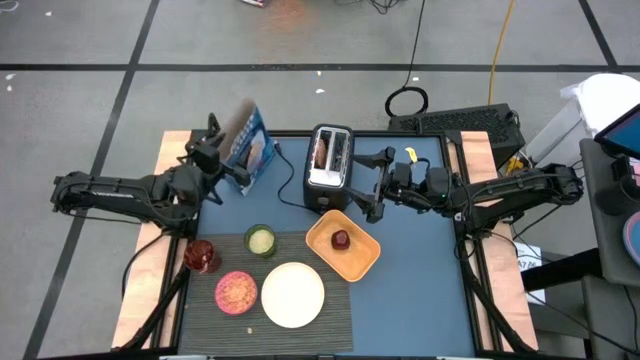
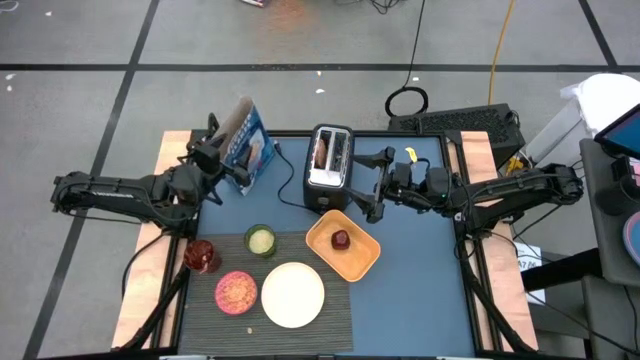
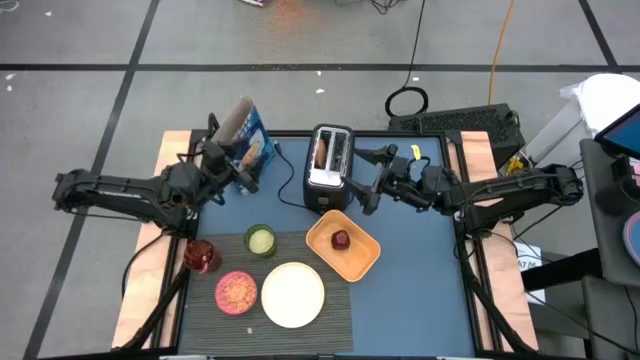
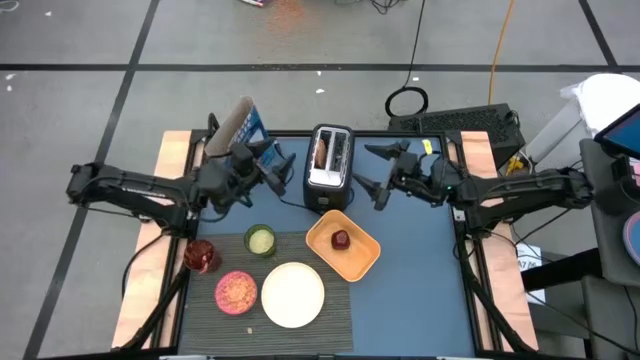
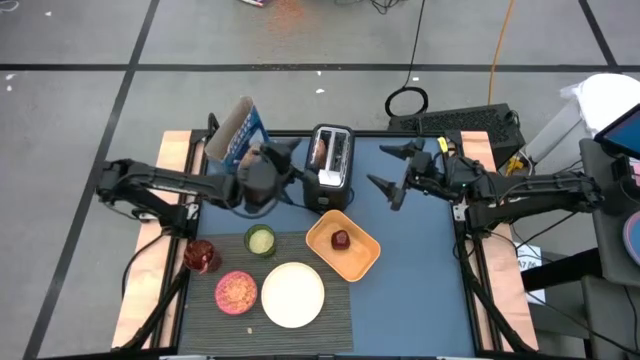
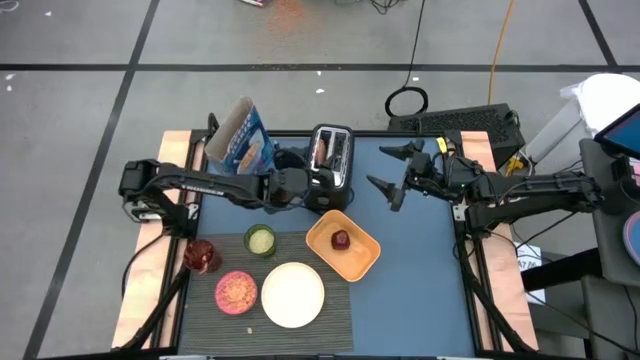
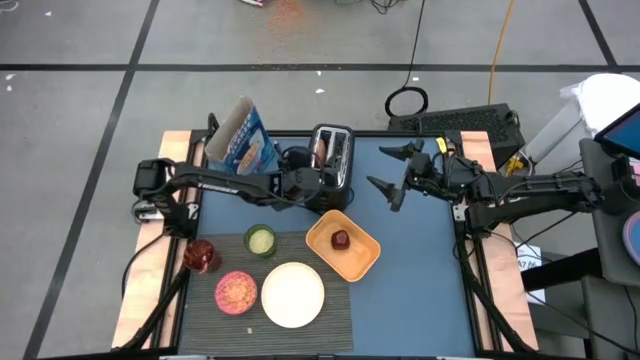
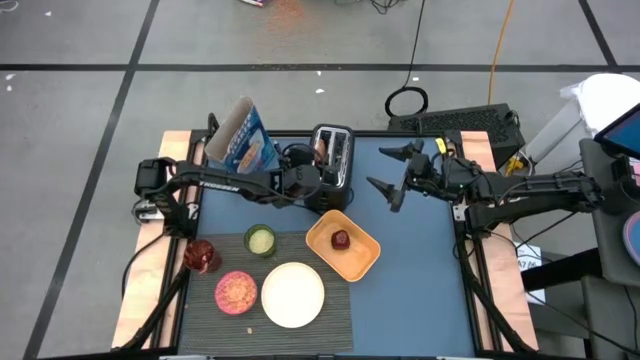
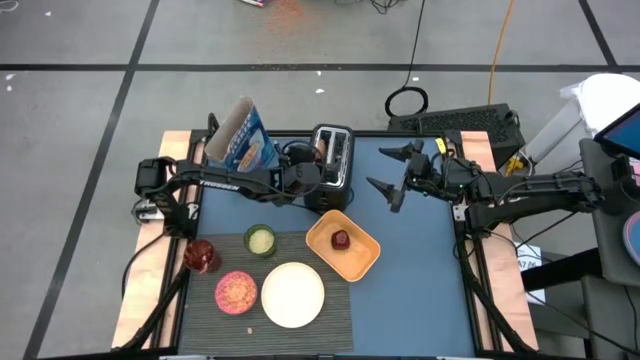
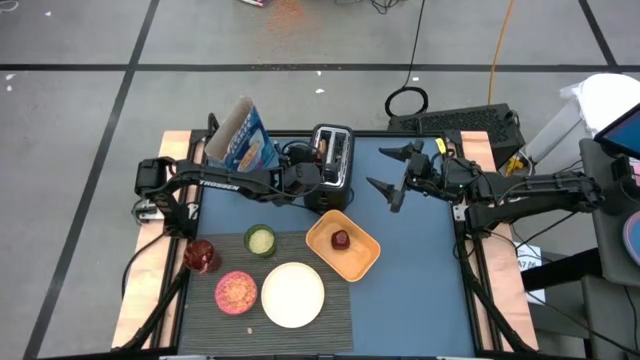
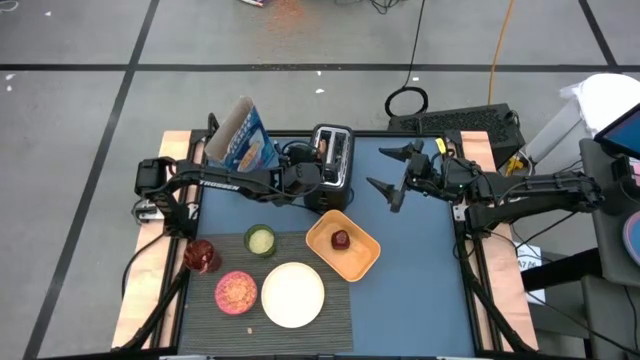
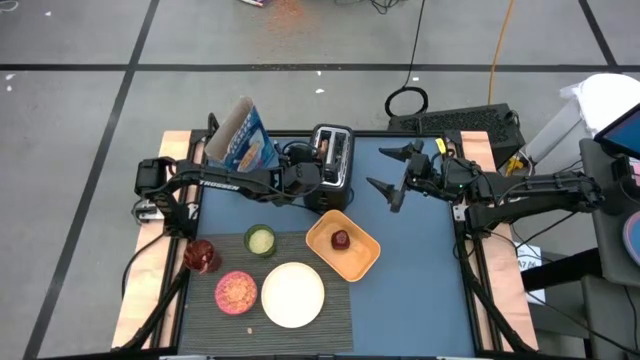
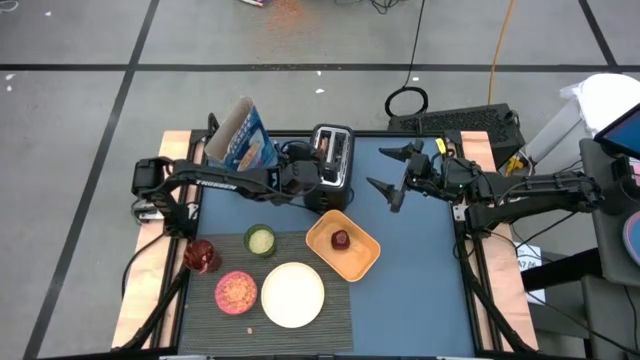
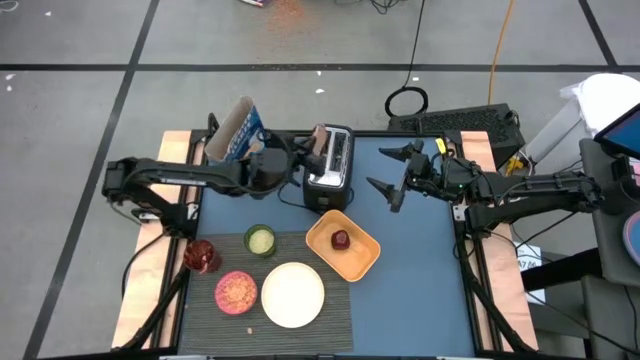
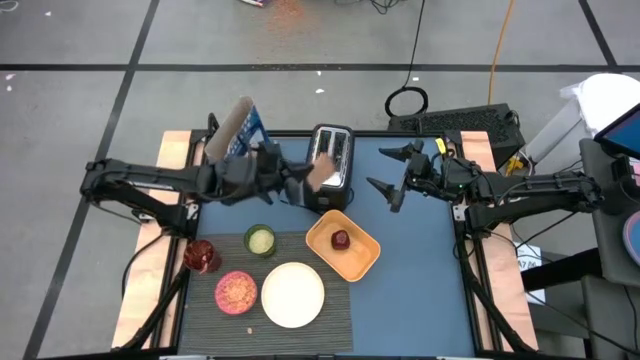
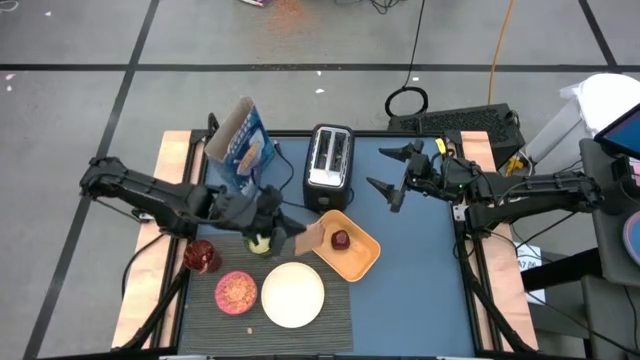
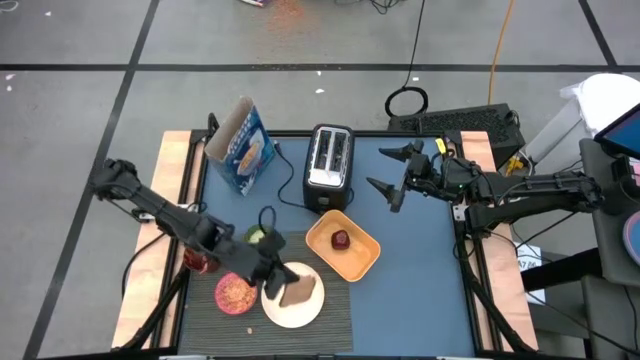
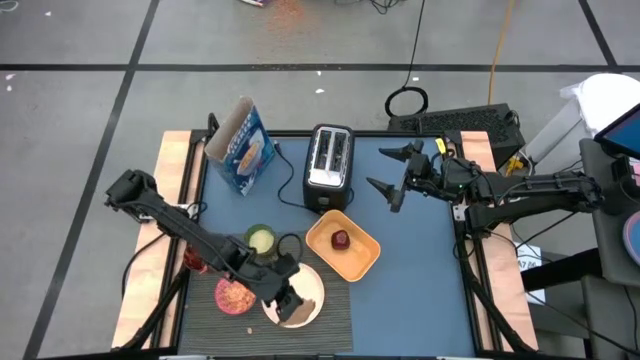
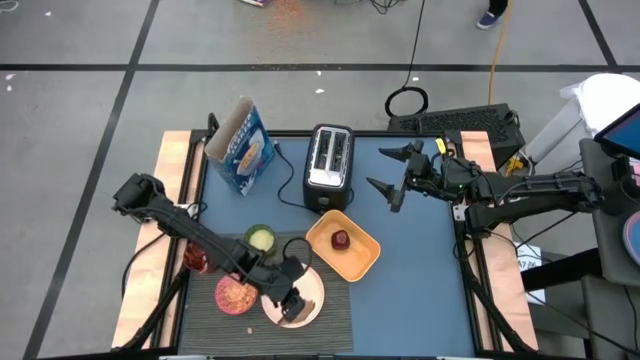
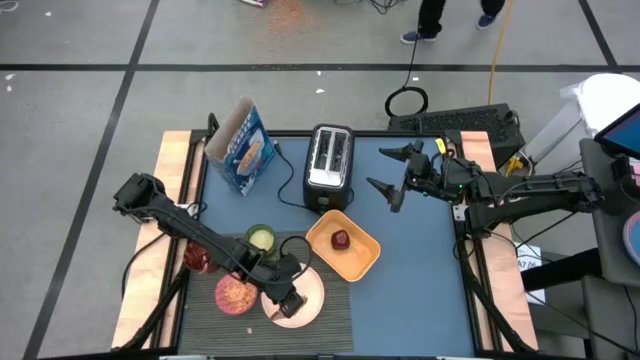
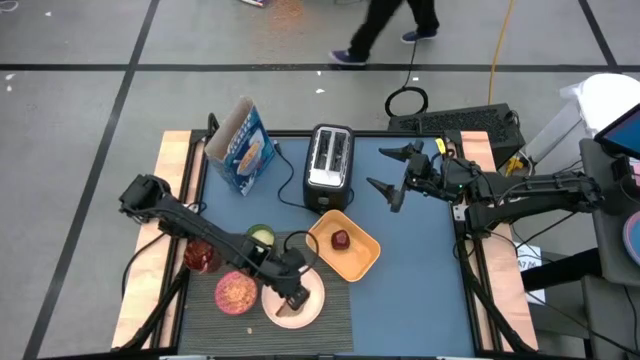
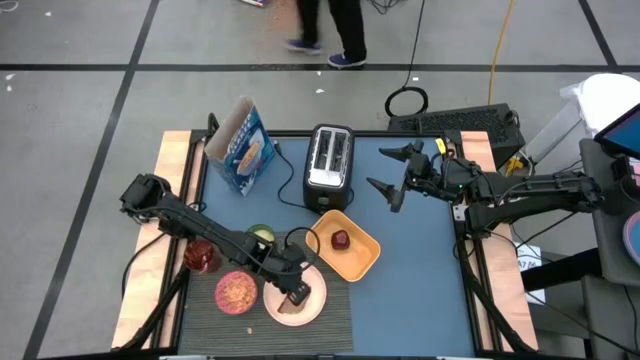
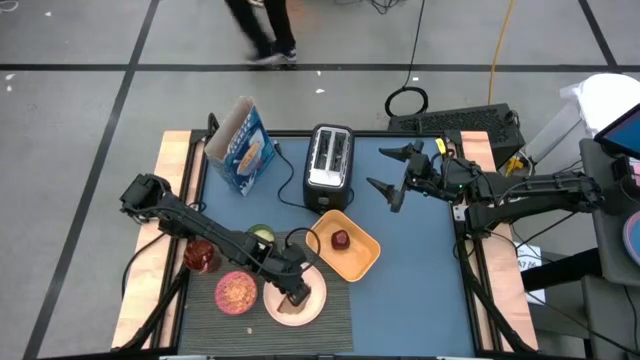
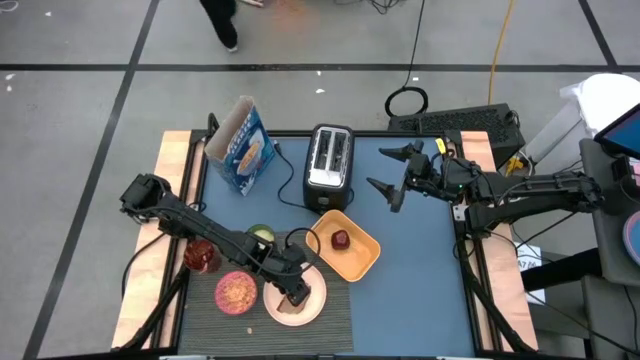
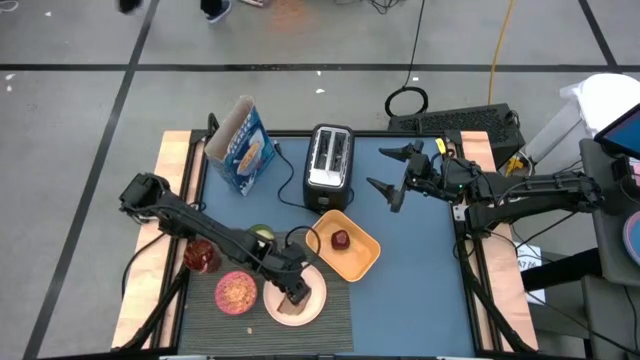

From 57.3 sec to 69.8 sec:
Task: Arrange a breakfast setting
Put the bread on the light orange plate

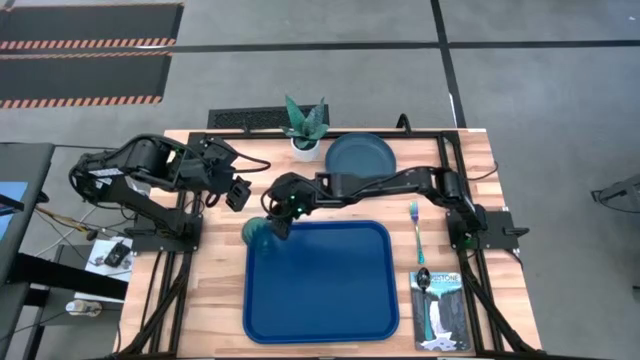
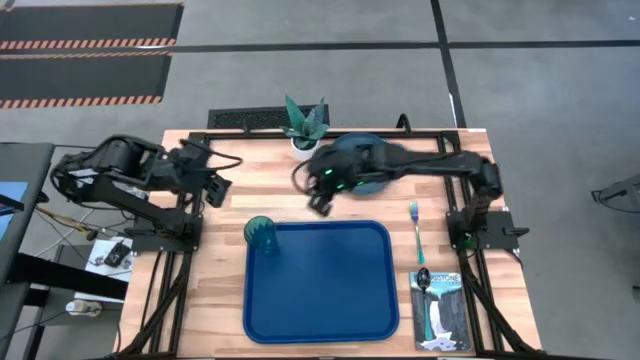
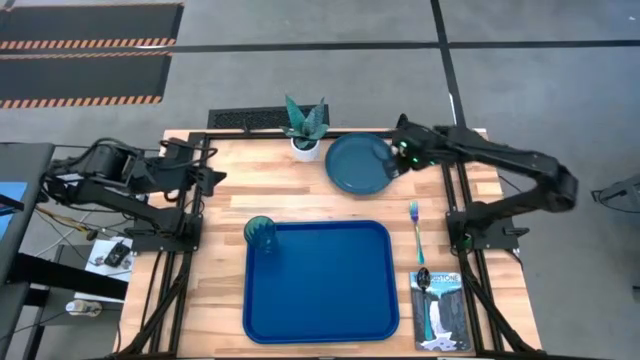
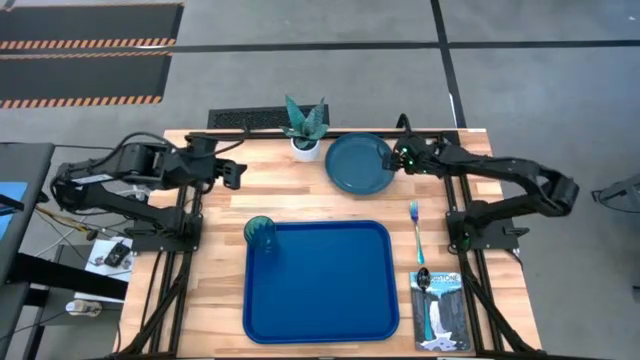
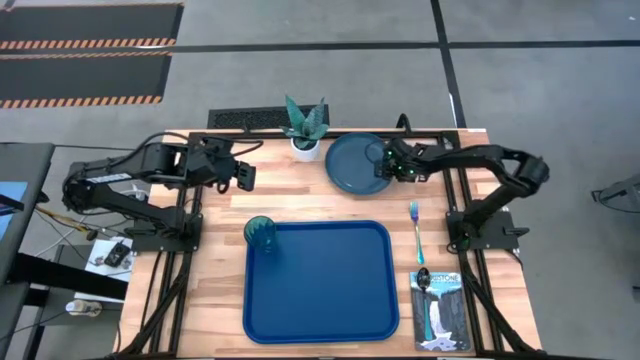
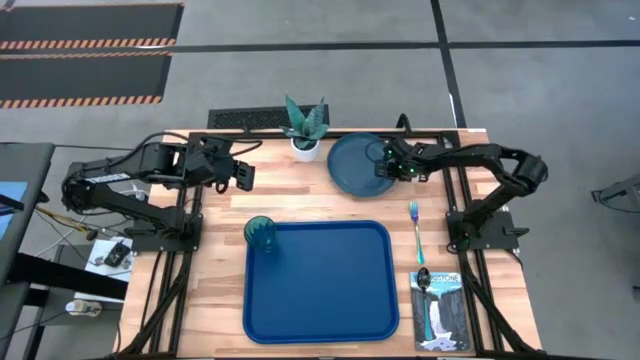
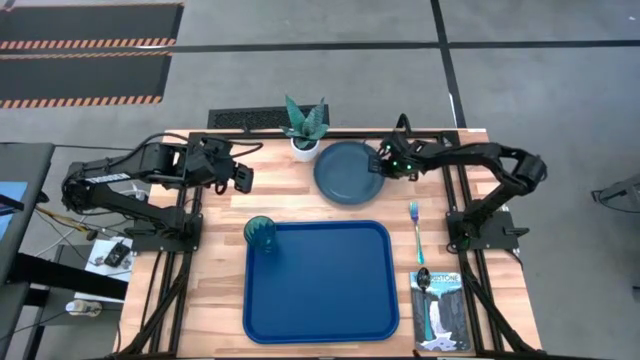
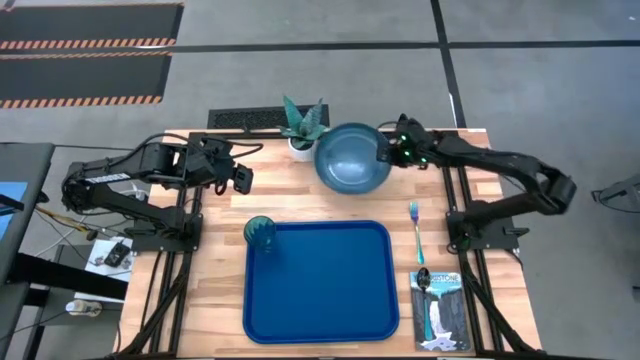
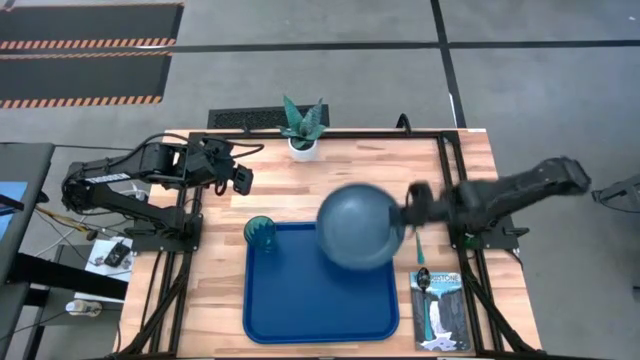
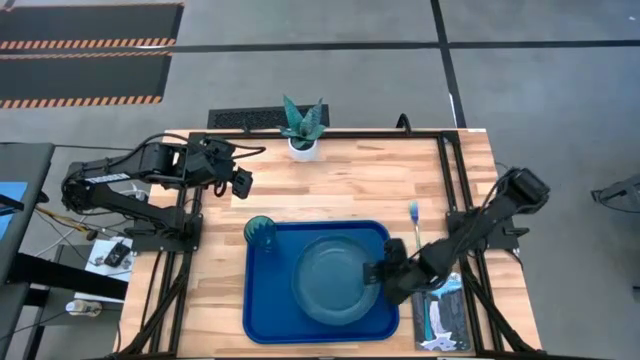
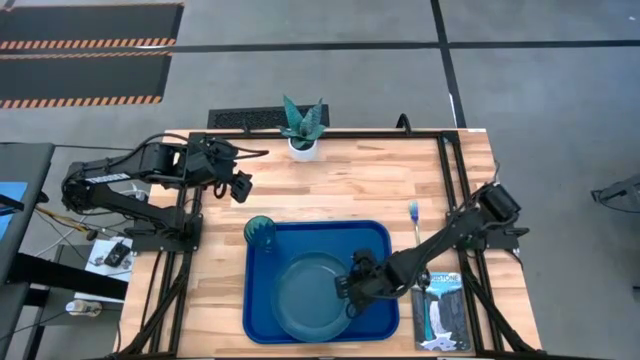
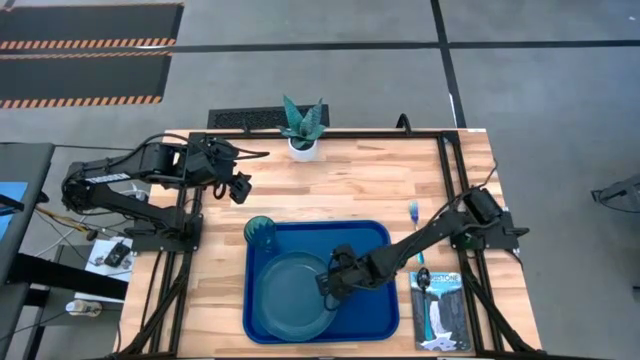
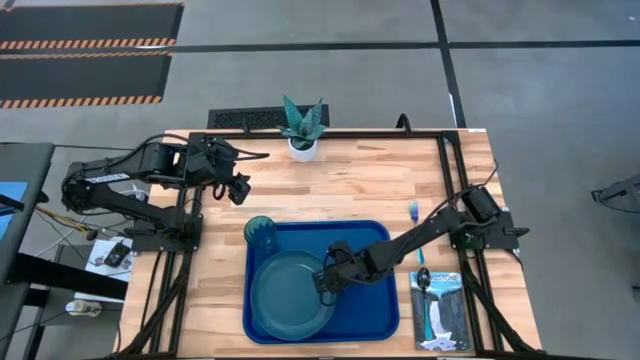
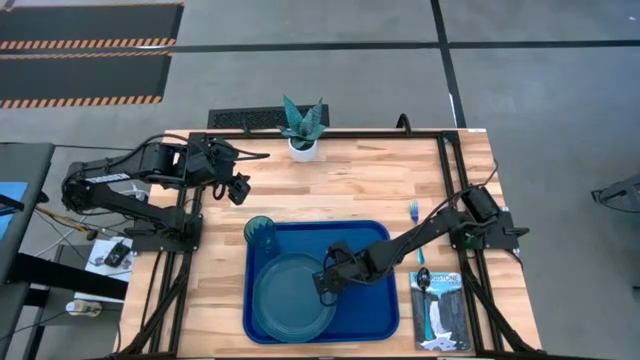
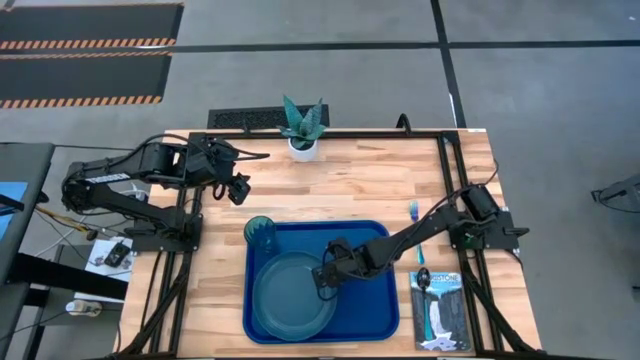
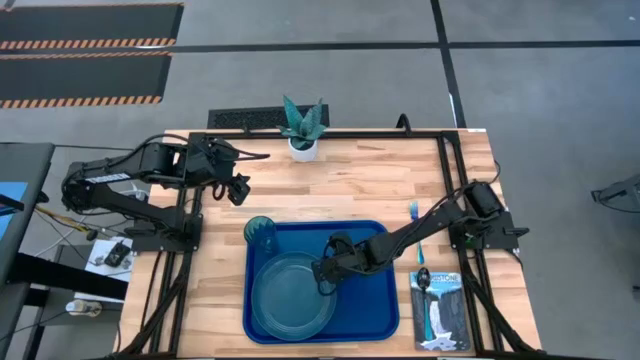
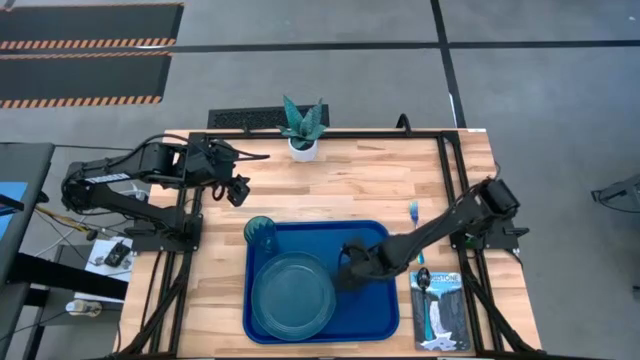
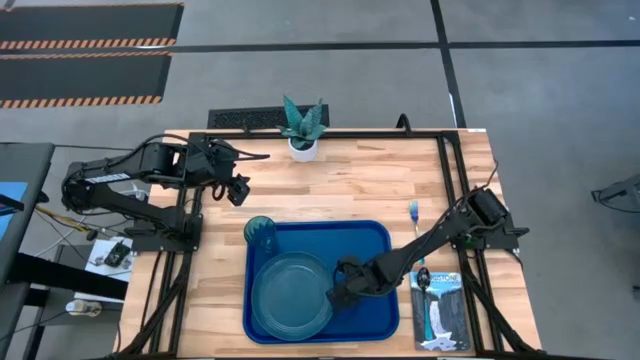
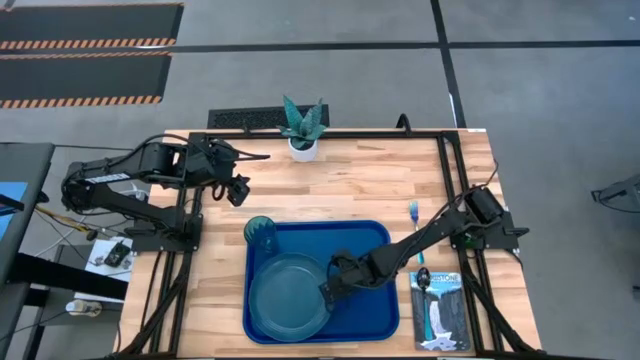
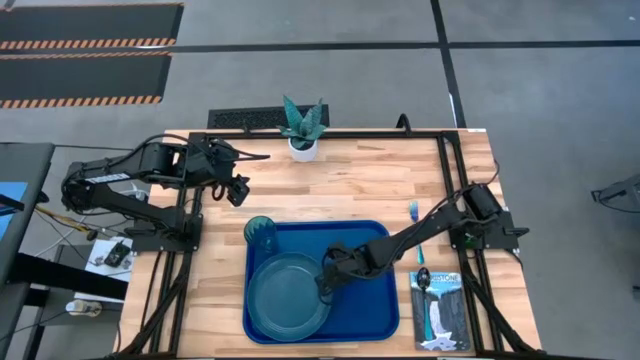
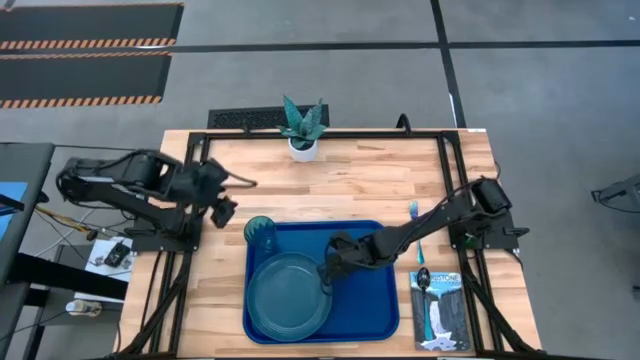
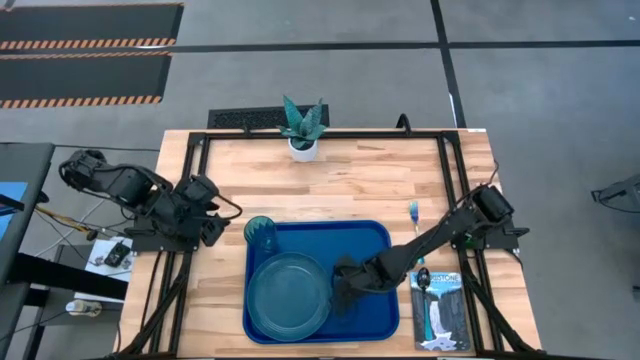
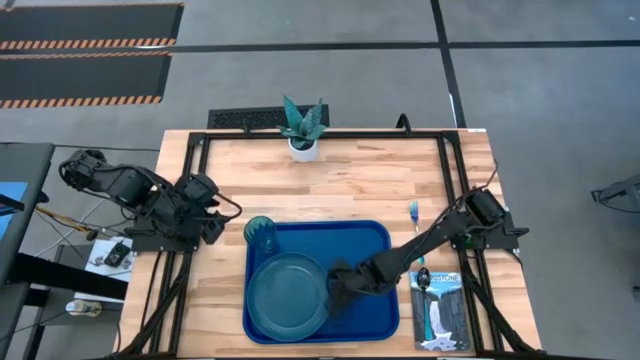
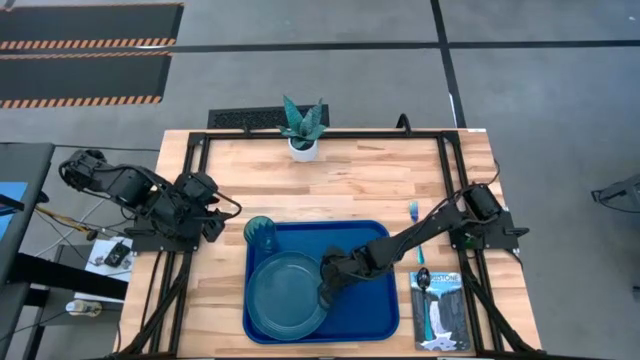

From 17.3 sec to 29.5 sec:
Task: Pick and place plate/cup/fork/spoon on tray
Put the blue plate on the blue tray to the bottom of the blue cup
